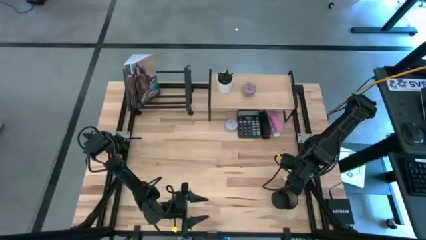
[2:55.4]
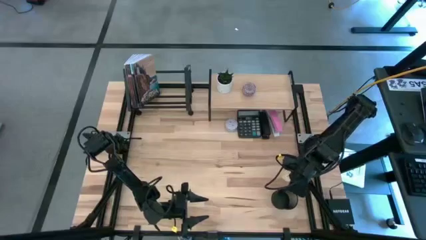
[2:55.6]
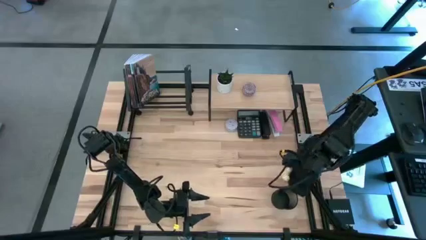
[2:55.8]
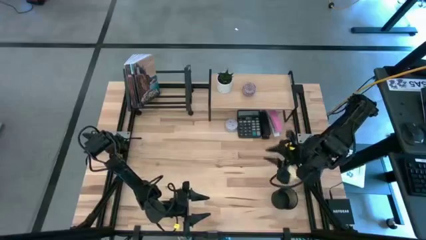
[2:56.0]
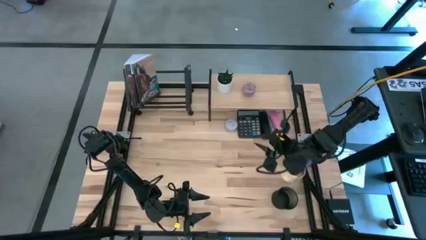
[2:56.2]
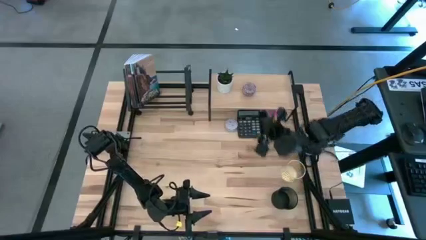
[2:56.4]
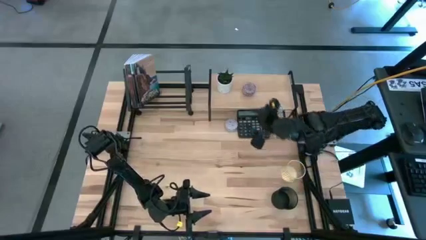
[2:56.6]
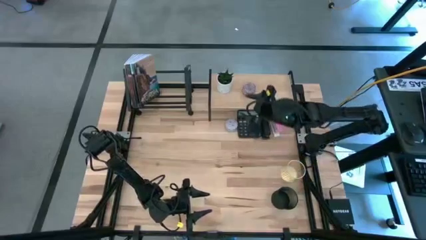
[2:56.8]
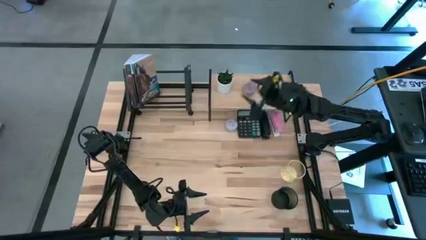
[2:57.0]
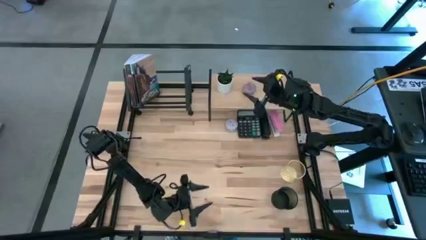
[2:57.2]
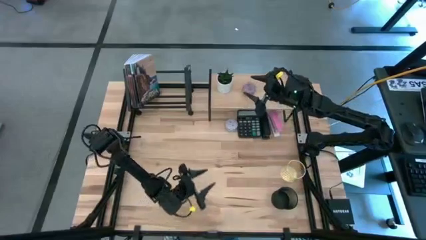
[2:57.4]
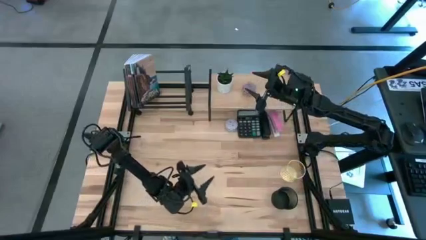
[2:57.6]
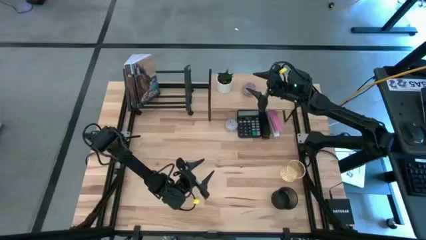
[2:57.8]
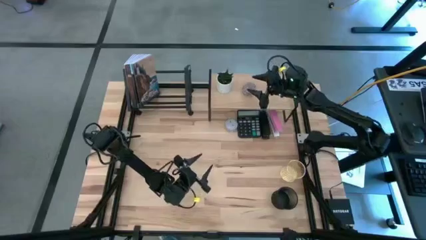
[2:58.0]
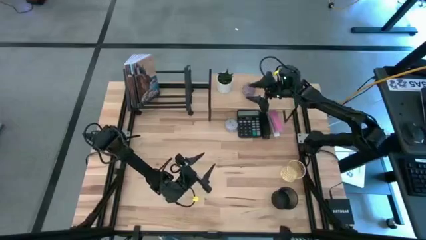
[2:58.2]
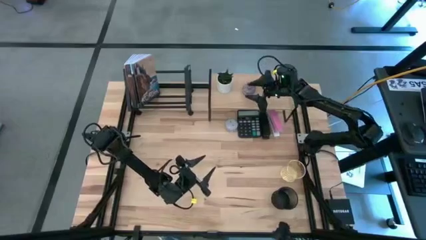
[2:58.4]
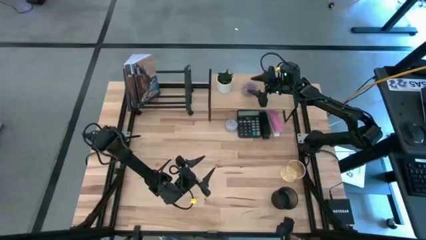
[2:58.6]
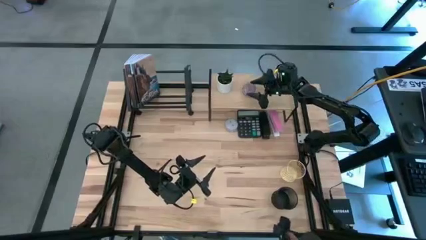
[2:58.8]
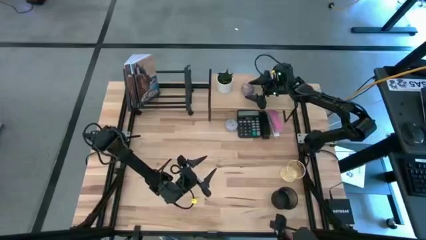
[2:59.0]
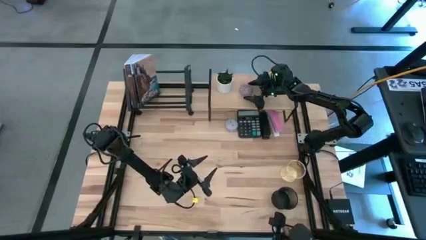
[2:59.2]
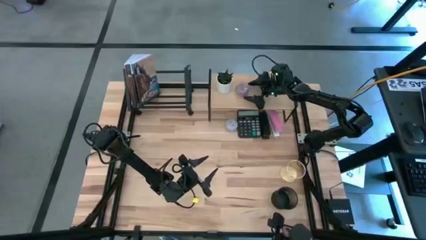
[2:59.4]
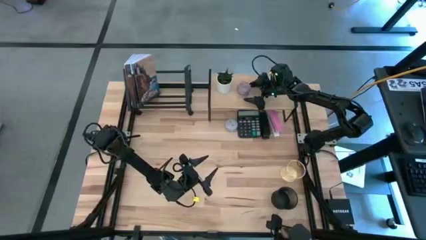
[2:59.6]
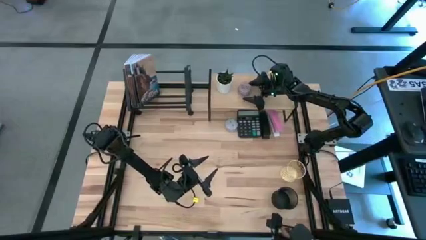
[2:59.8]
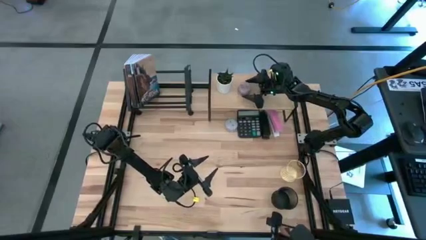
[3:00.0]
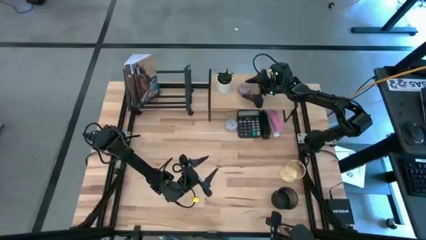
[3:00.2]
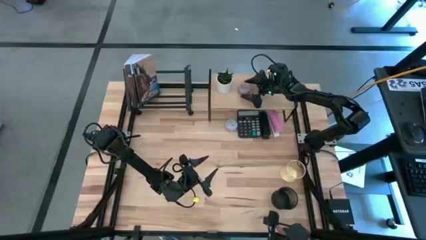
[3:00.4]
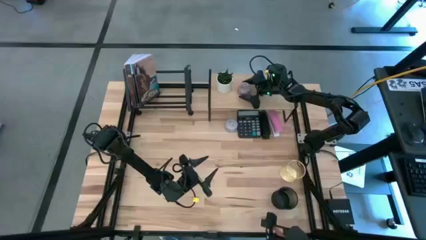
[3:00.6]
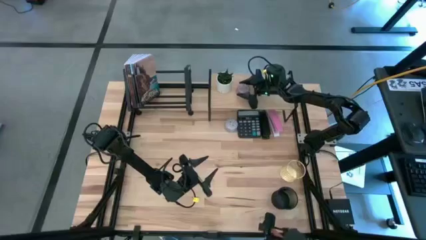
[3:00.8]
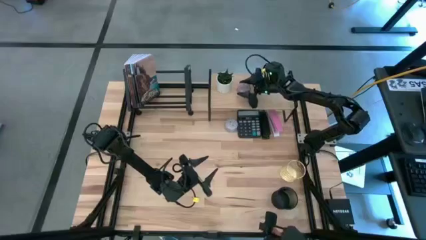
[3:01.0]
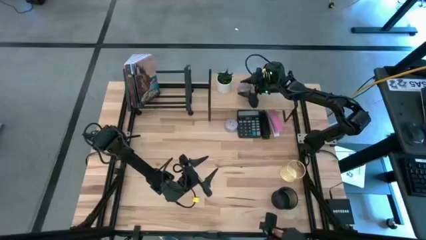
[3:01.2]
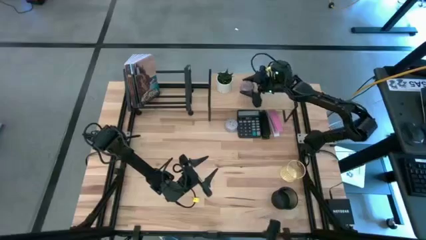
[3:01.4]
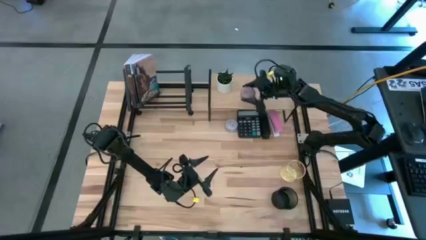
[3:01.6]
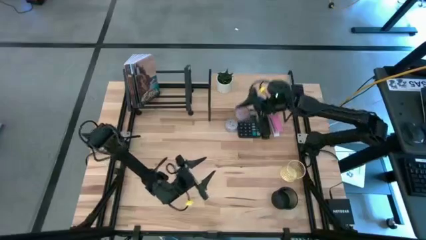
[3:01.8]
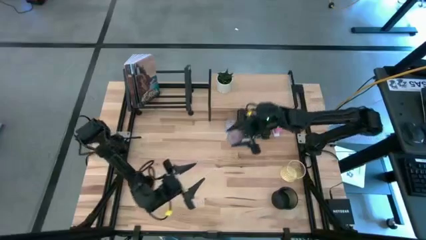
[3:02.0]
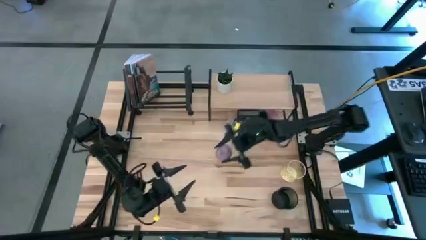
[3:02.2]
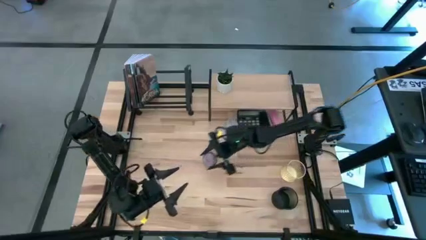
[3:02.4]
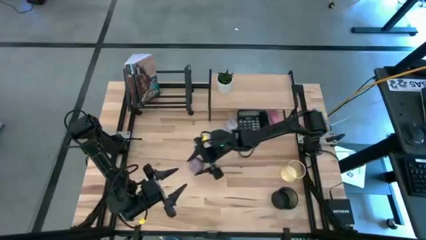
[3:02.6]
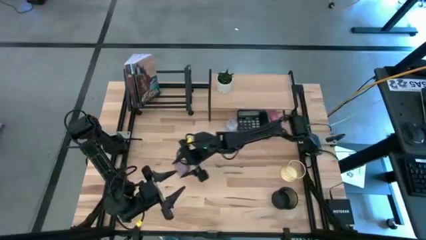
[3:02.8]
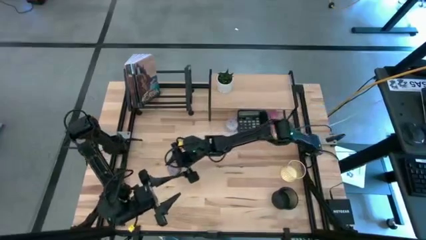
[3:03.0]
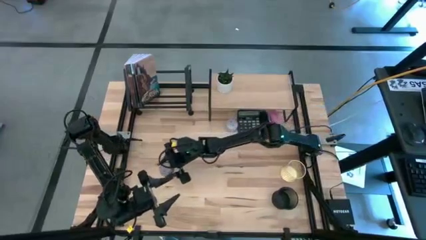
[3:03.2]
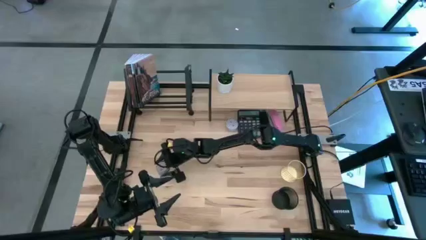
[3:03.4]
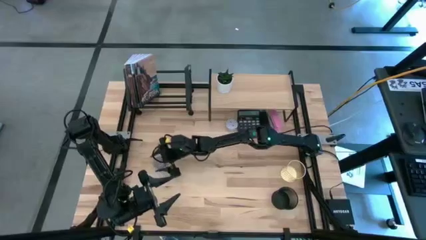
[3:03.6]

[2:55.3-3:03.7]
Task: Stock shelves
Remove the red floral-patterned item from the shelf

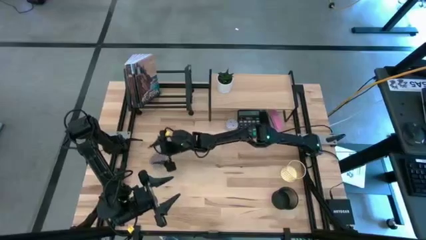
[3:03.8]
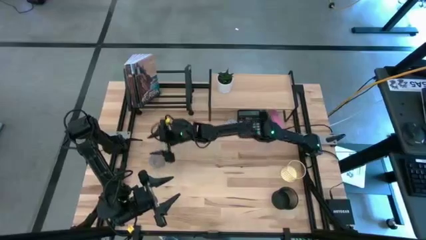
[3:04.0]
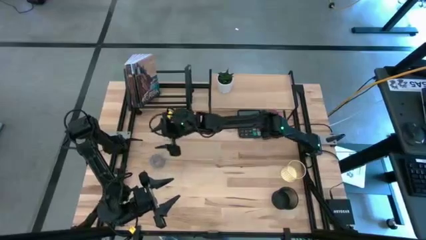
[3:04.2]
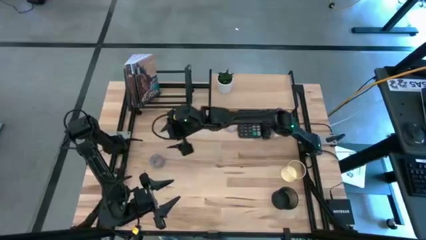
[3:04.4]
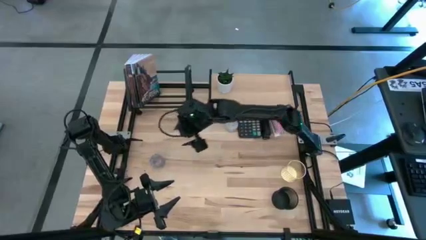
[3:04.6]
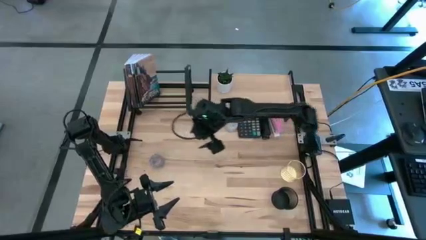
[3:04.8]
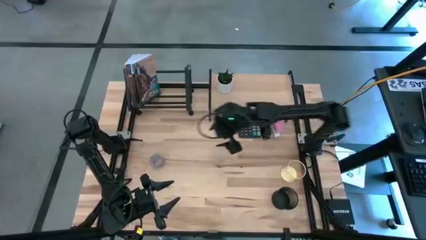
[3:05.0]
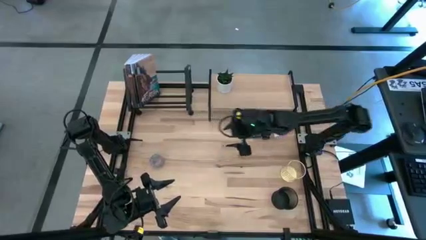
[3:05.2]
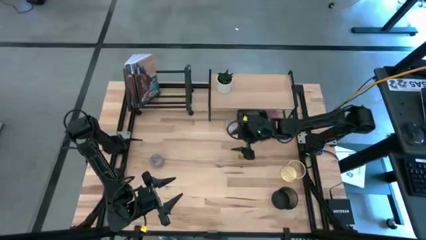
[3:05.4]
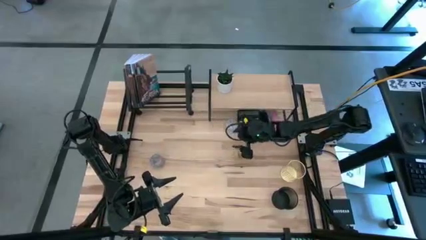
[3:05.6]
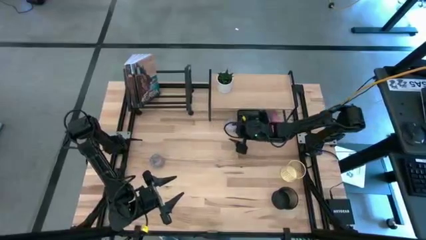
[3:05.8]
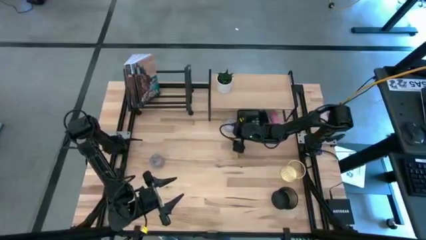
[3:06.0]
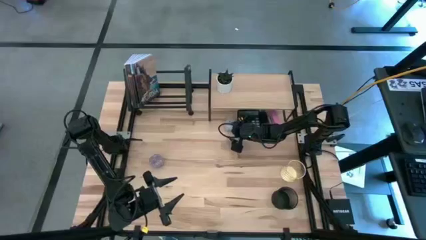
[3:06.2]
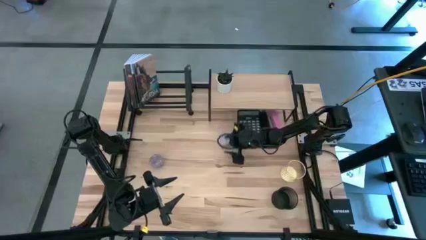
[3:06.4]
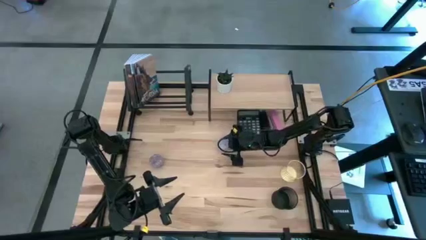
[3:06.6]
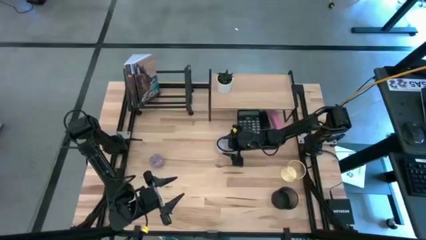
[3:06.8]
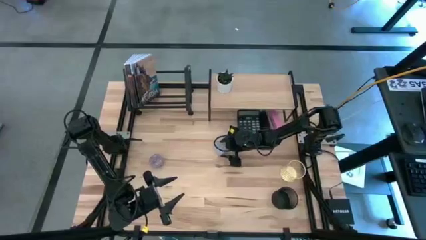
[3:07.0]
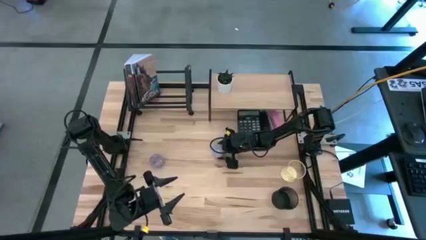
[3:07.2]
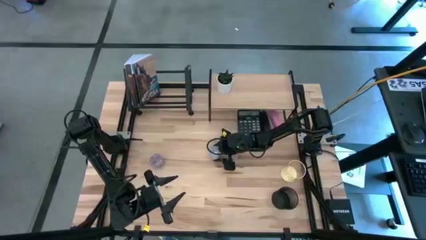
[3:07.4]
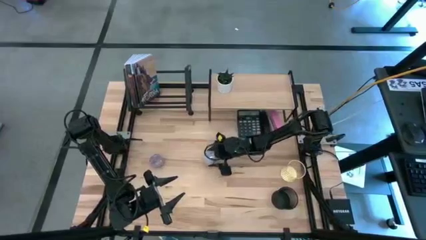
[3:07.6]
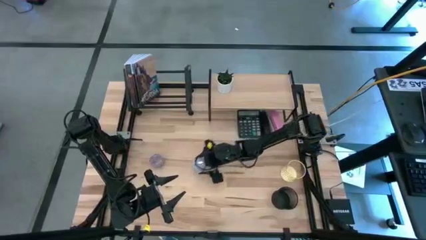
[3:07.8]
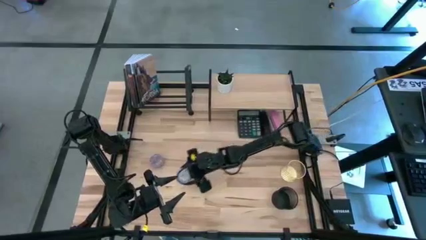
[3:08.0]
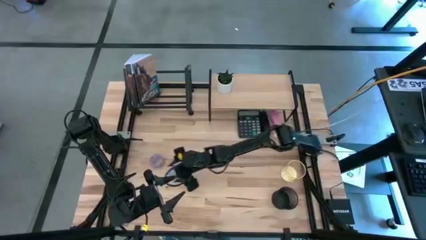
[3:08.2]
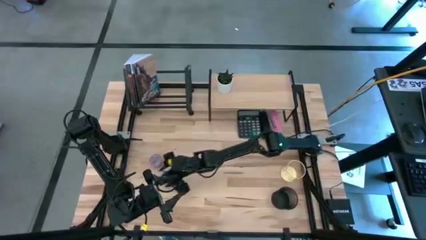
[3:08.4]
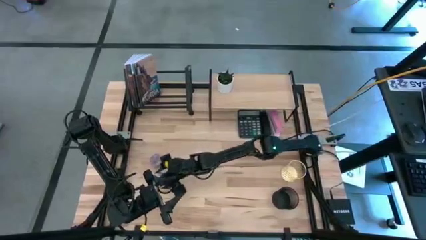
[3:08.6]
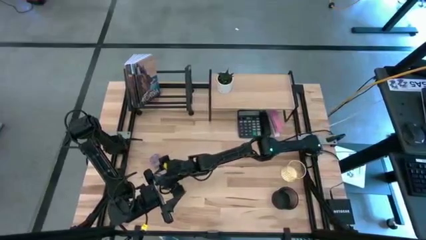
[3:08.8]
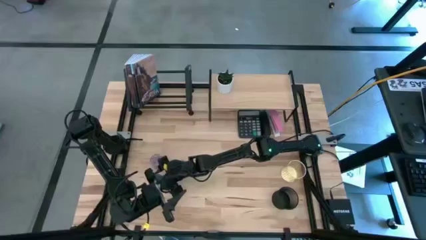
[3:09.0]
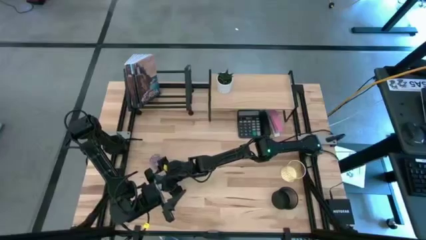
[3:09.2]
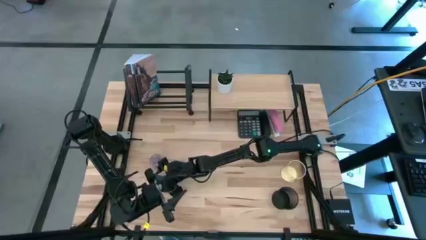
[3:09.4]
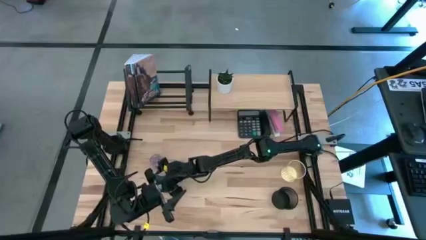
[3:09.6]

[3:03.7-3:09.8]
Remove the white floral-patterned item from under the shelf

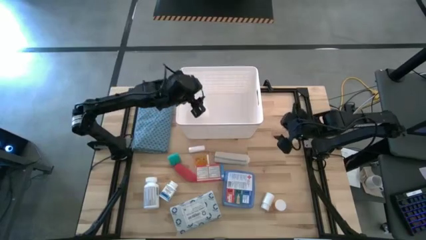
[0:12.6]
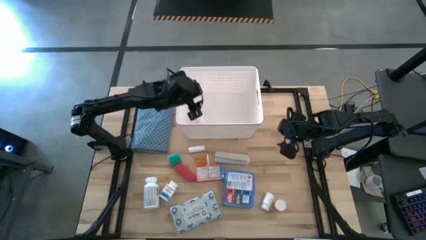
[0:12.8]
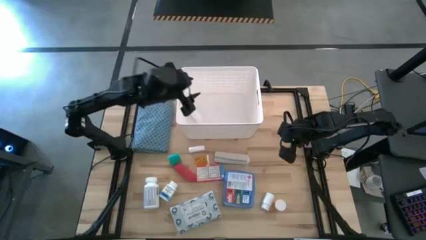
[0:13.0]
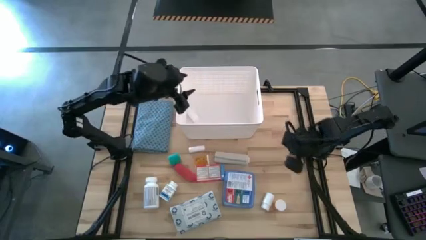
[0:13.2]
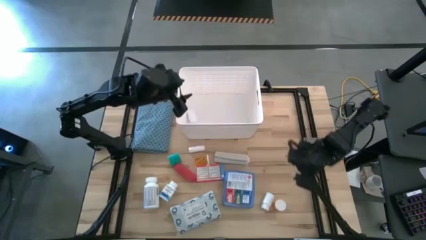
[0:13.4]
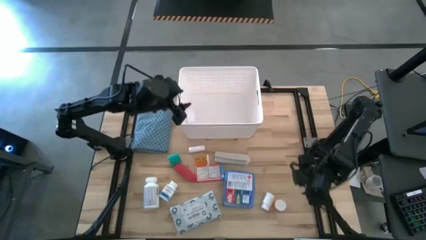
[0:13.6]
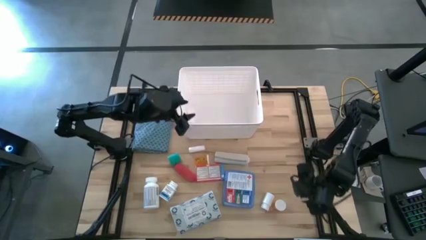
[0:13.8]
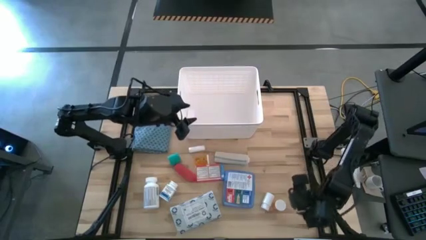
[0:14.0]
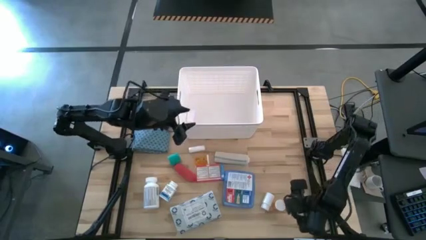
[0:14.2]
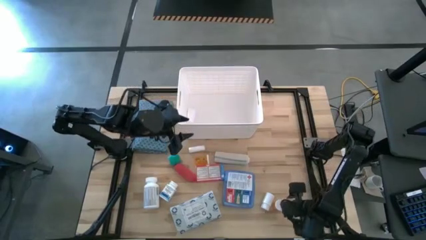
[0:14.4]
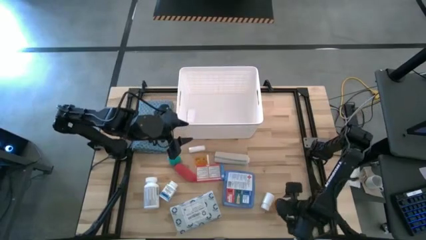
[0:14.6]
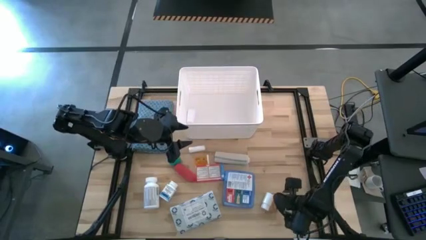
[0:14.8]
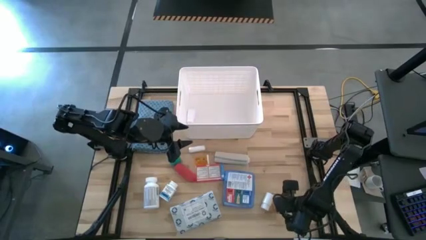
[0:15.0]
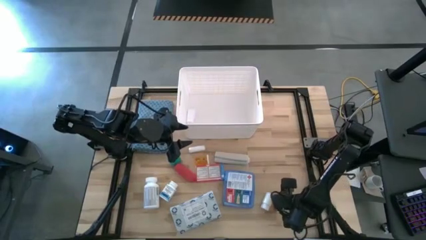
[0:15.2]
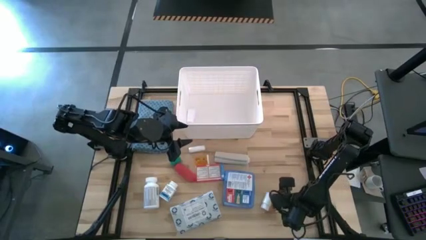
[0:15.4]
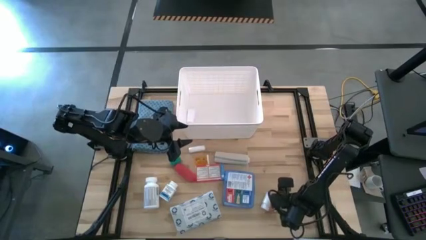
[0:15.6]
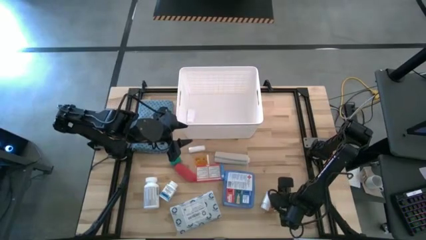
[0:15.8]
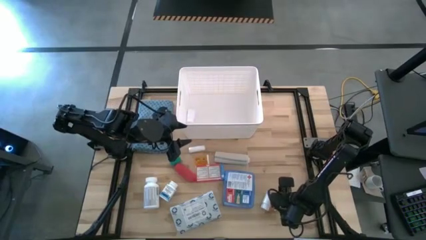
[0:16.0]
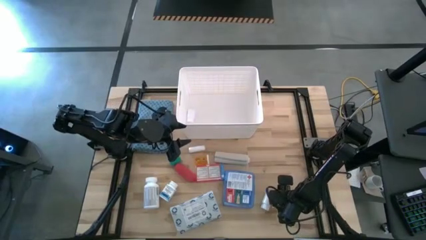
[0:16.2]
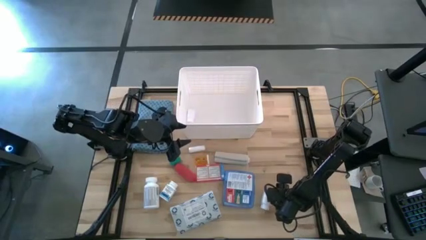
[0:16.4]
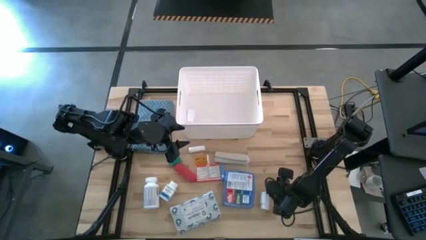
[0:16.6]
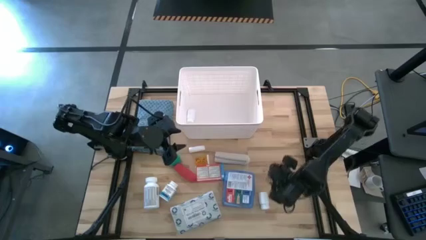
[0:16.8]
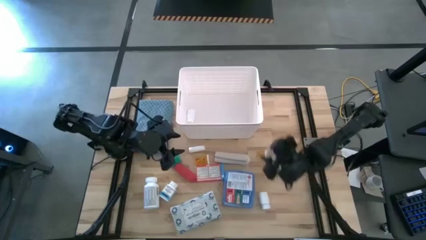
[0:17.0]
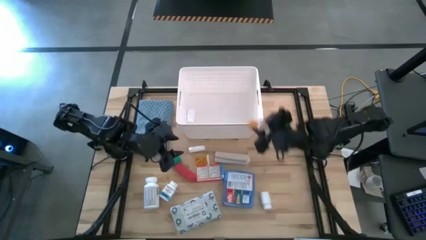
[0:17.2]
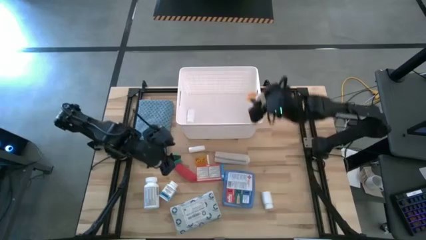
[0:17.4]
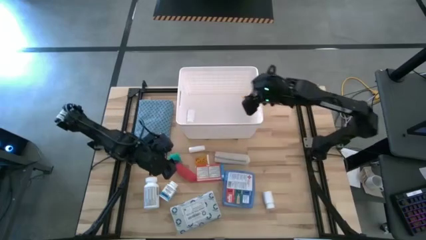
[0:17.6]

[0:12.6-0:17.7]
Task: Pick & place medical supplies in basket/bin
Put the orange medicine bottle into the white bin
